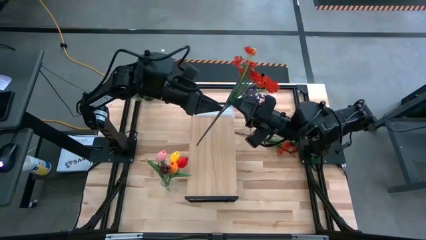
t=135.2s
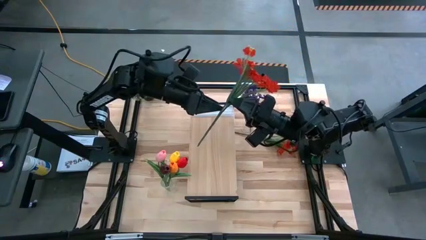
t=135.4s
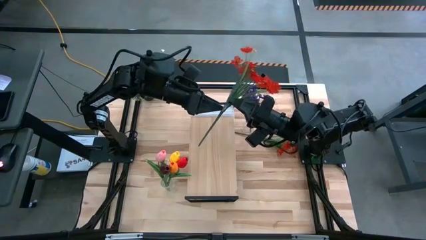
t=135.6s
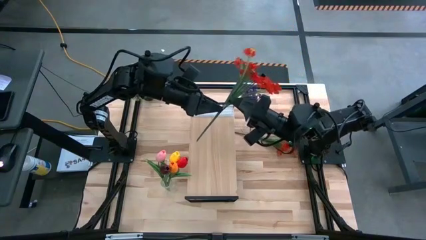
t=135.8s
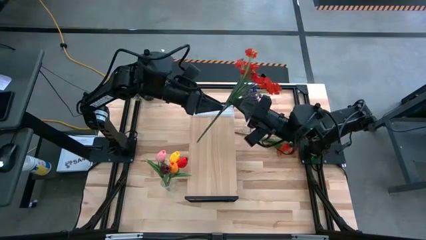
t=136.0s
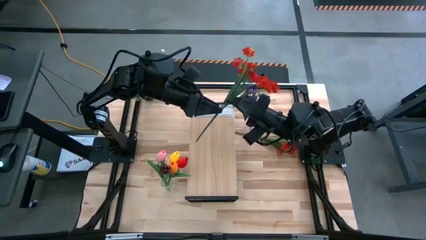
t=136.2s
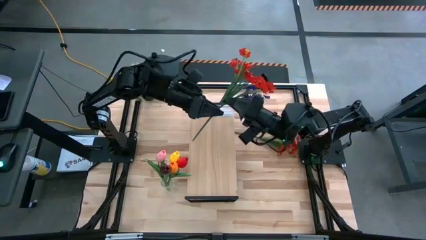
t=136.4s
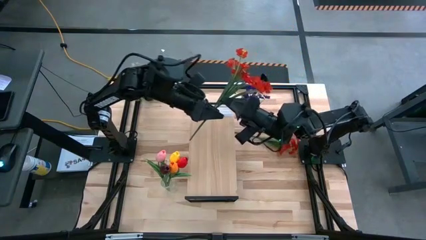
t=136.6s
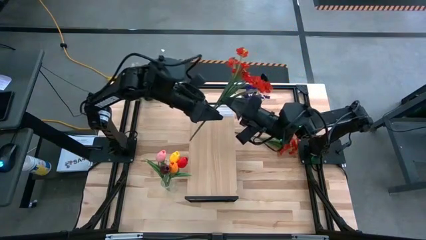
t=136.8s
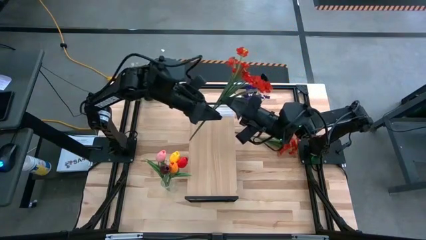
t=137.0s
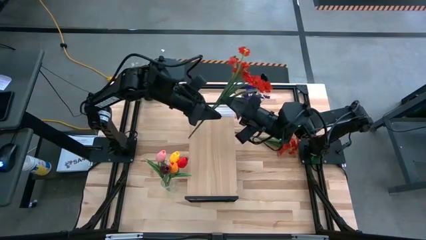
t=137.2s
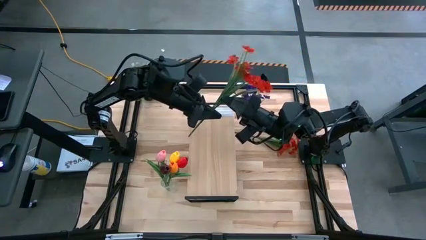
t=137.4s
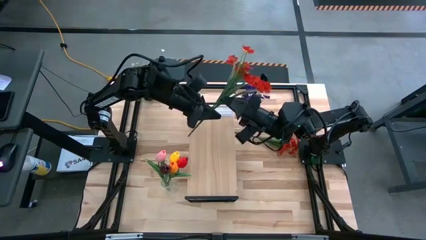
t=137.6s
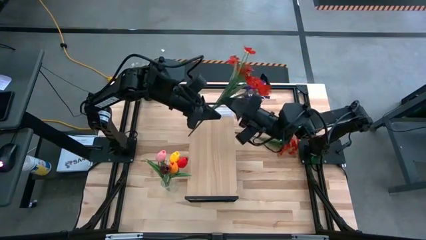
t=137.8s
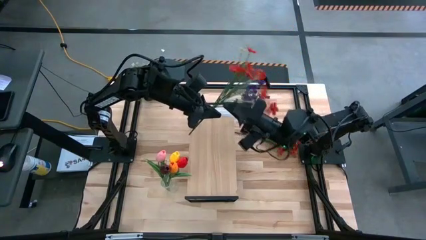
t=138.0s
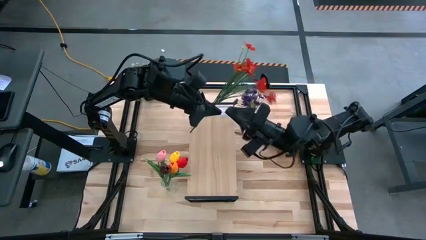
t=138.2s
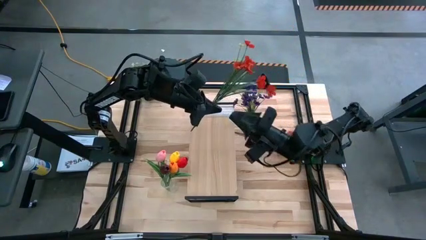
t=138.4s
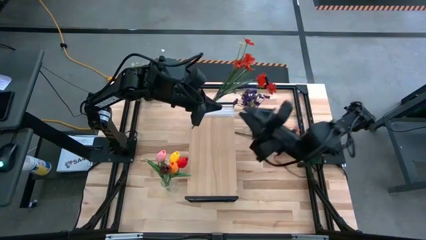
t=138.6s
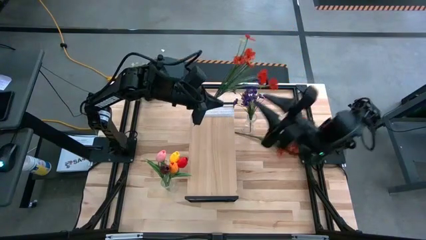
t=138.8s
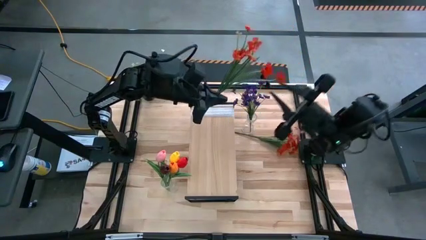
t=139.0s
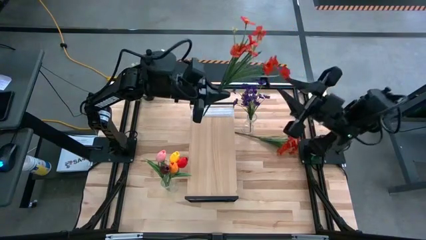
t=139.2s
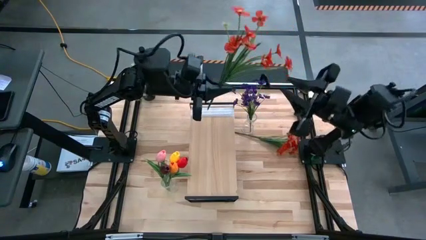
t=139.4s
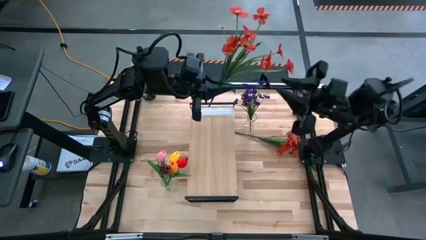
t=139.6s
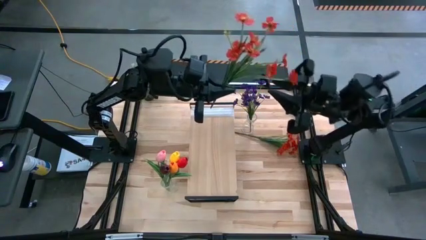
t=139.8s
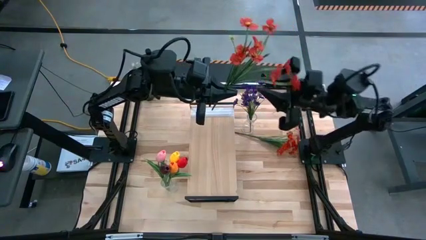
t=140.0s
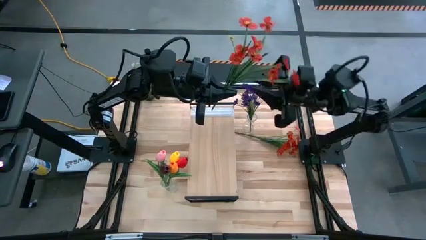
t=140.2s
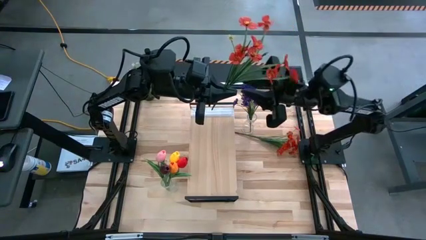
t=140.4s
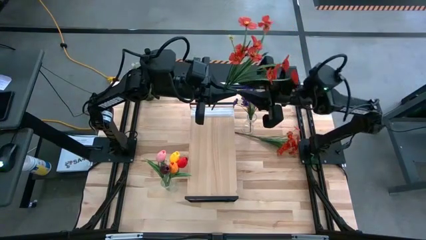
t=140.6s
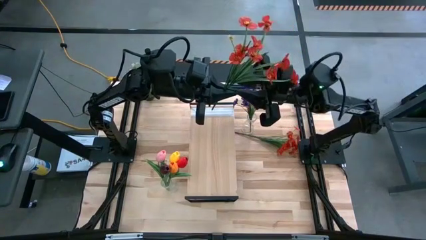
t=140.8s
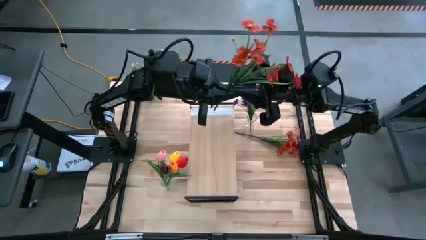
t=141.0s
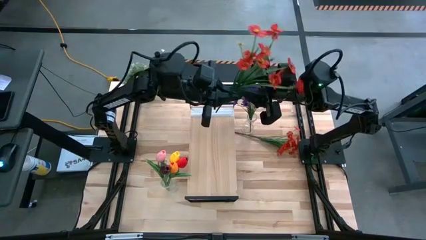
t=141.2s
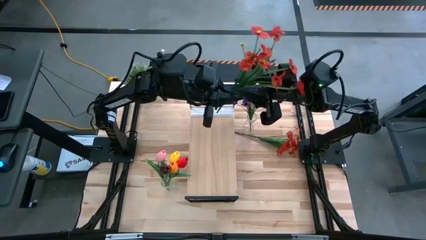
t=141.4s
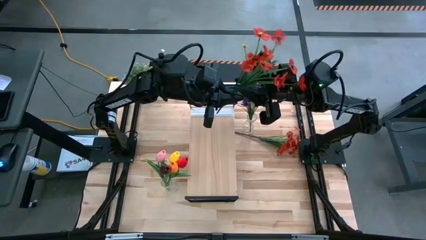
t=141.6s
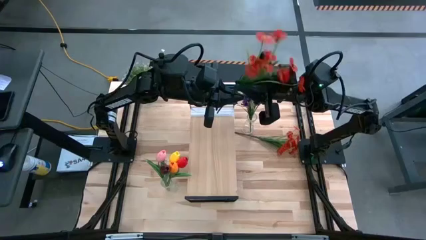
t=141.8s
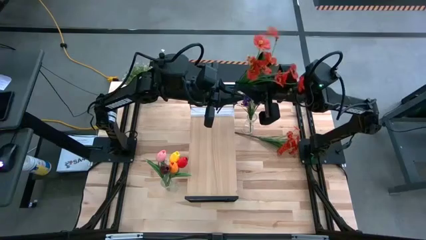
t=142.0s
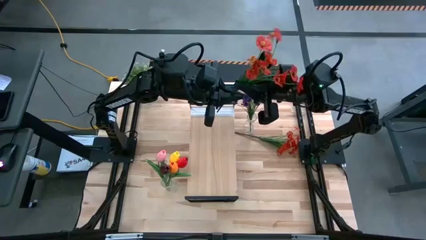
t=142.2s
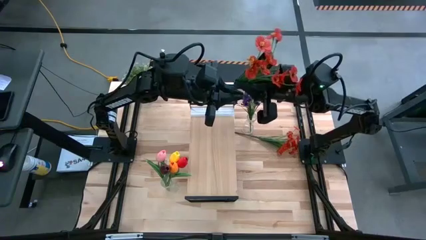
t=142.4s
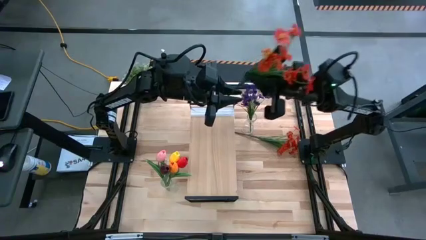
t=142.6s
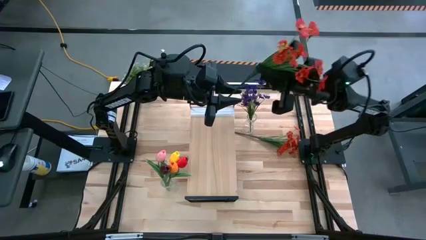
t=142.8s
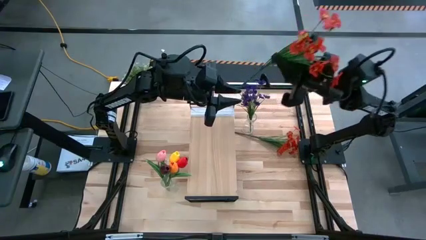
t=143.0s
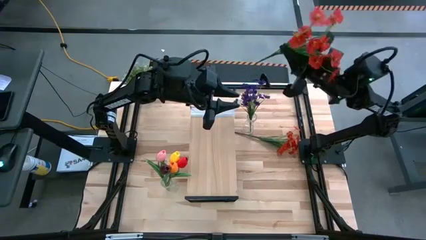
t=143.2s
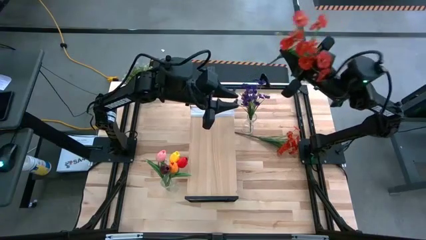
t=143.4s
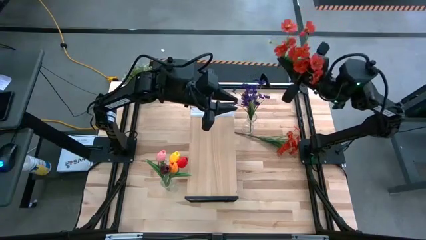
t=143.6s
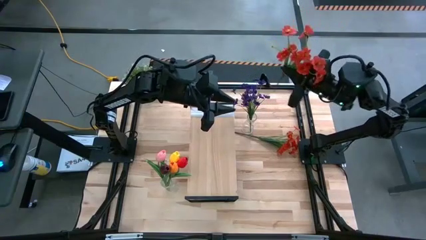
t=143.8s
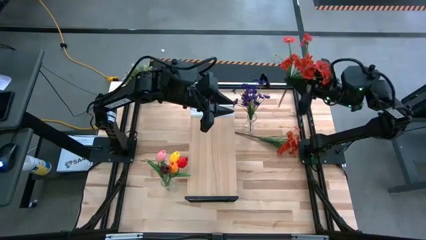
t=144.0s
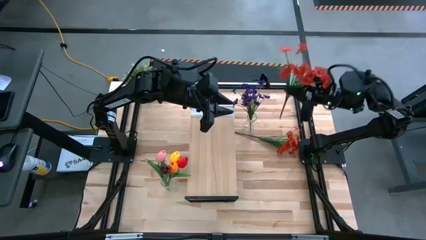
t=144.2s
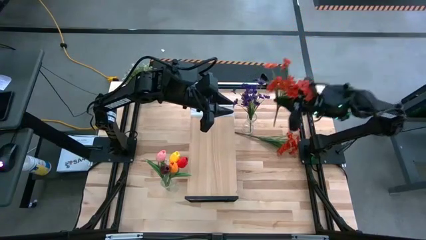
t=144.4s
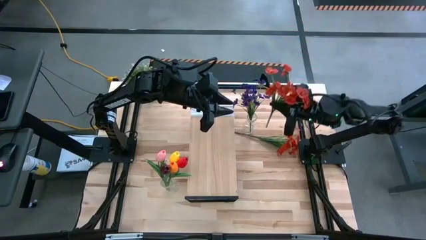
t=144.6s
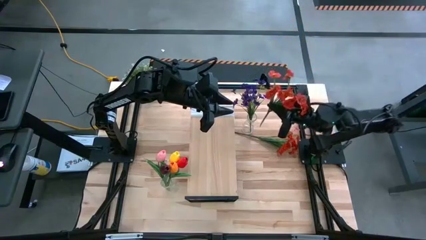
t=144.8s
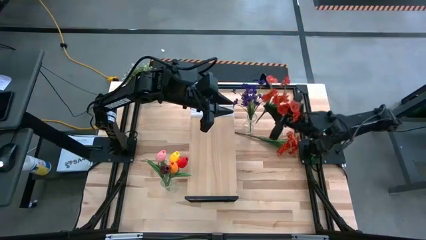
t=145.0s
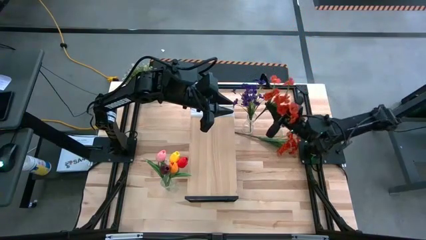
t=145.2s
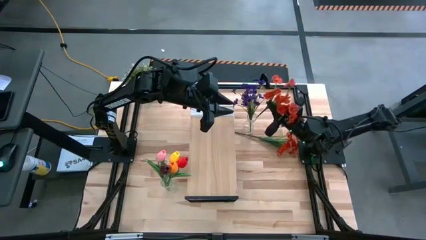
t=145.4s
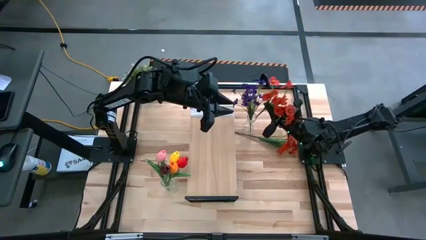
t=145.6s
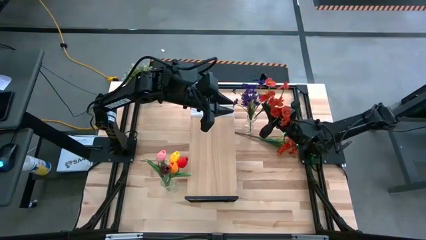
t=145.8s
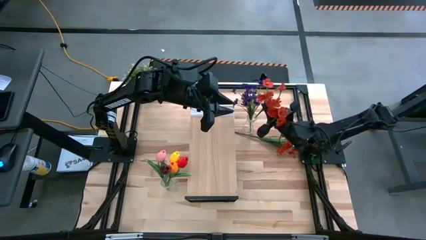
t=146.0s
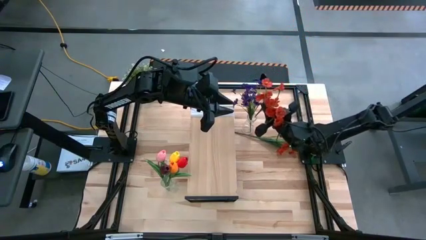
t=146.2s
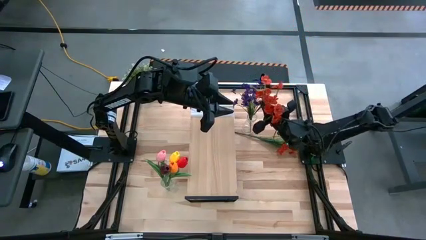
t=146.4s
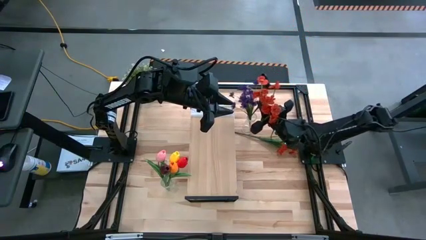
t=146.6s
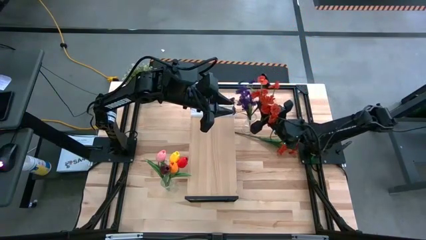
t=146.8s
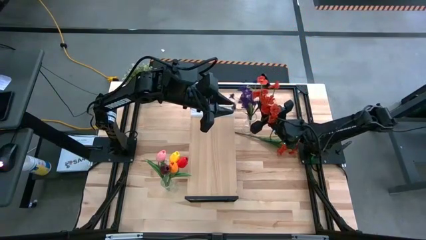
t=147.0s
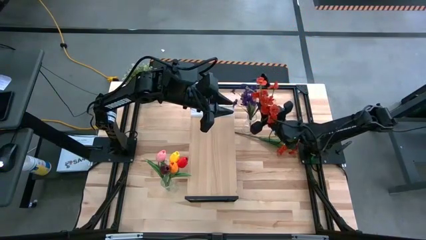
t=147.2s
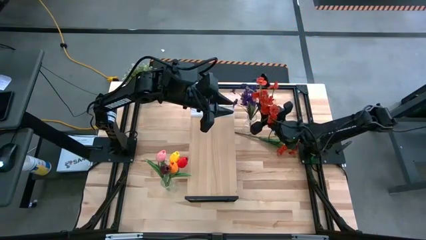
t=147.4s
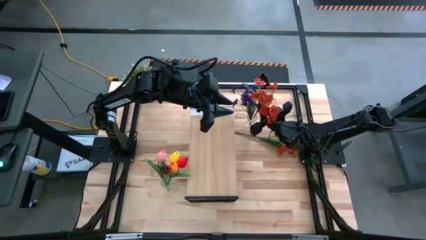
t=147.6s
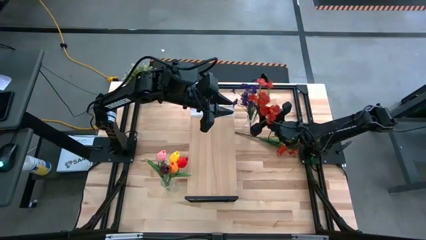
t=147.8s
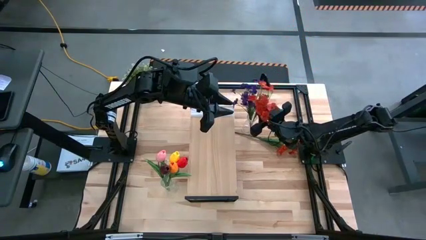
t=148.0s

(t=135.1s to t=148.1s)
Task: Pick and place flowers into a vace then onto a shelf
Put the top red flowers into the top vase

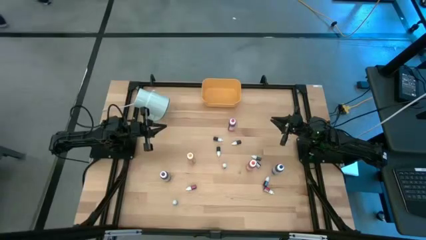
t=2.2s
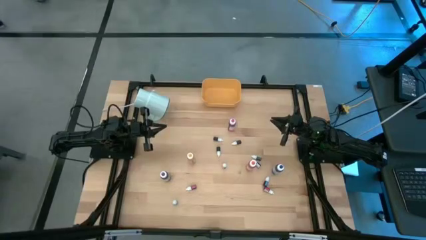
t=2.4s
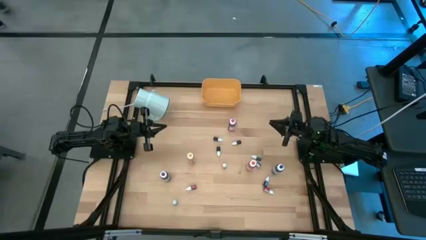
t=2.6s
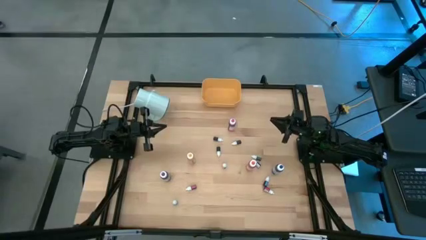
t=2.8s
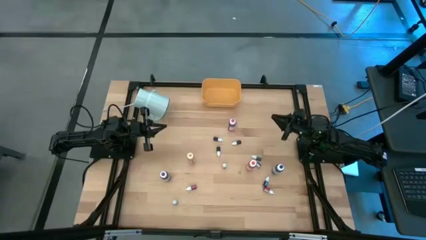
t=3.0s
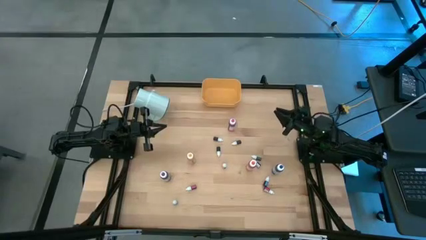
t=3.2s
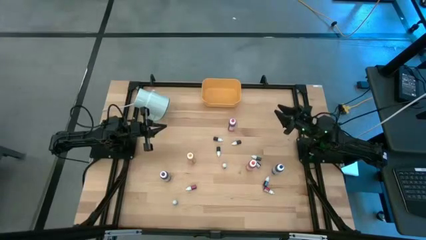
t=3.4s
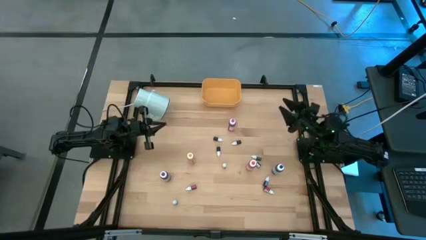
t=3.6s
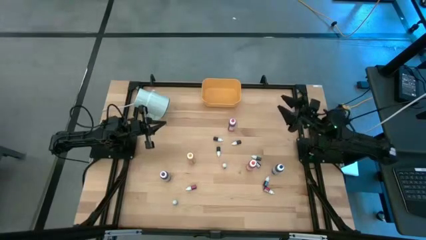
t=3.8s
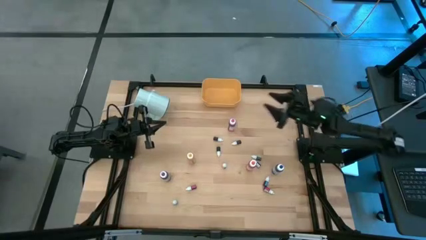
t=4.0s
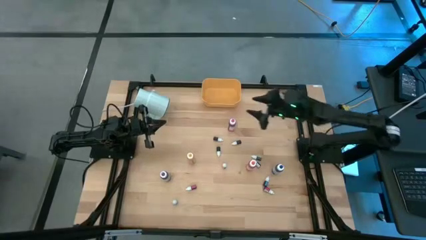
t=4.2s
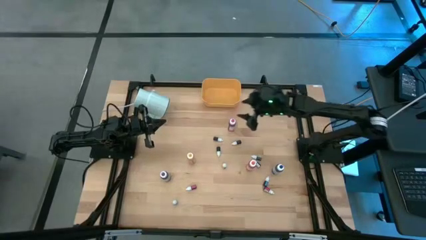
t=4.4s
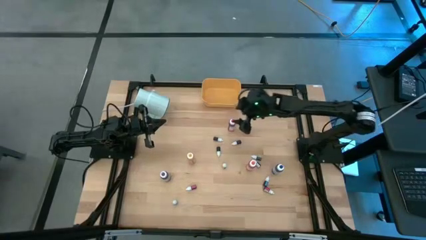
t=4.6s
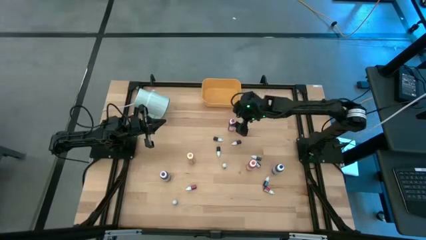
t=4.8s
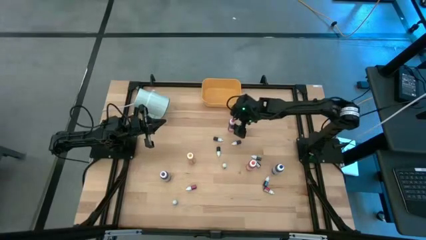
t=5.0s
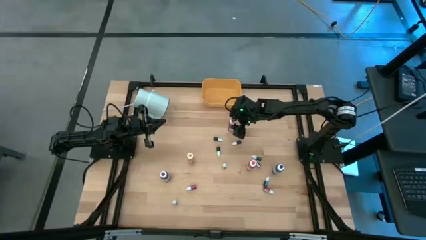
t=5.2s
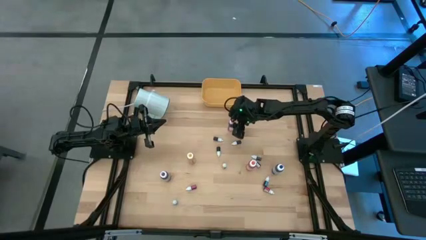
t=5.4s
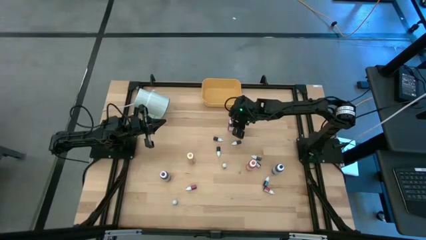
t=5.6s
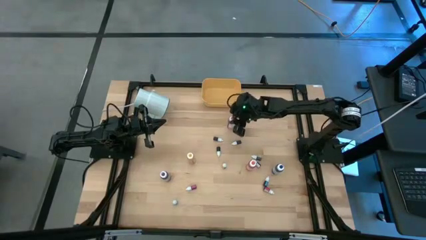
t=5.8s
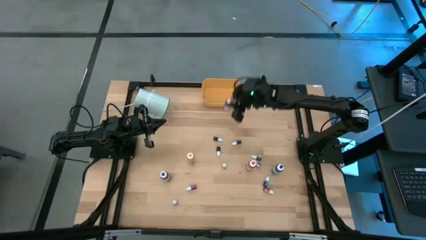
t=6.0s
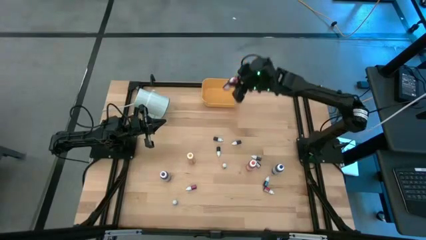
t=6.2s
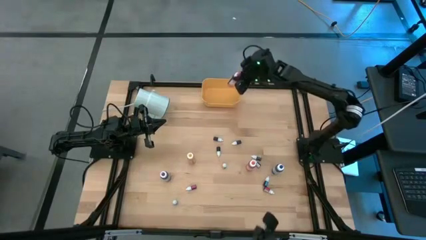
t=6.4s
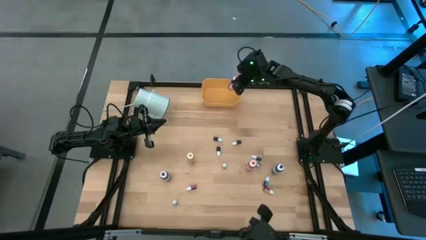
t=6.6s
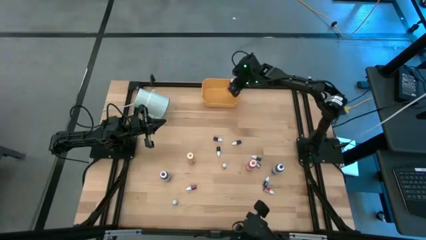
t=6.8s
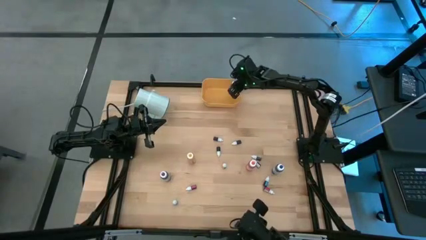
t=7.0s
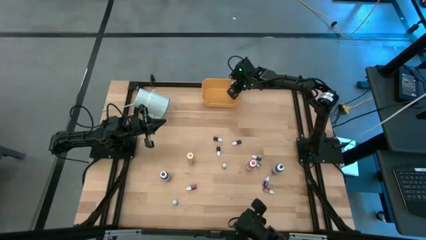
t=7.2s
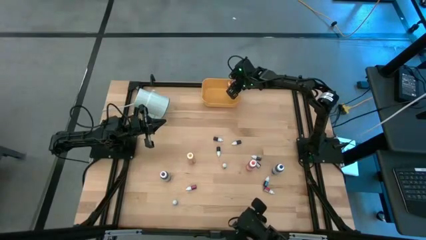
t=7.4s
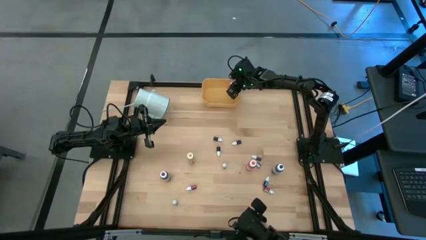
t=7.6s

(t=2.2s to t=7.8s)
Task: Pick & Place food coloring
Put the pink food coloring bottle into the yellow bin
